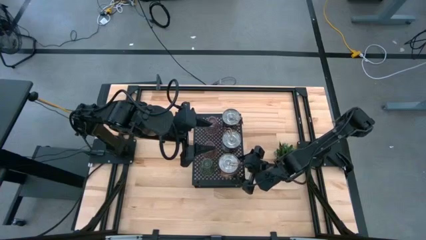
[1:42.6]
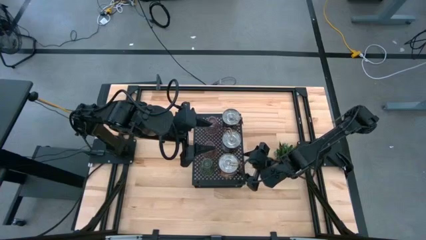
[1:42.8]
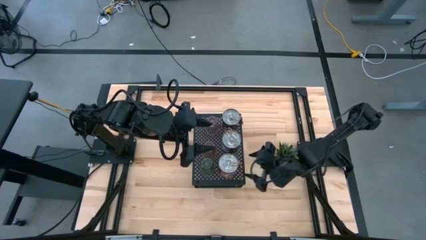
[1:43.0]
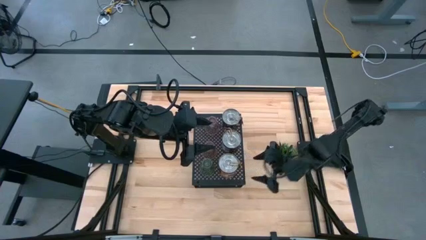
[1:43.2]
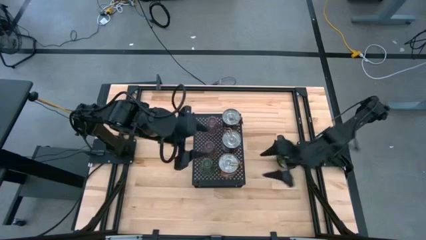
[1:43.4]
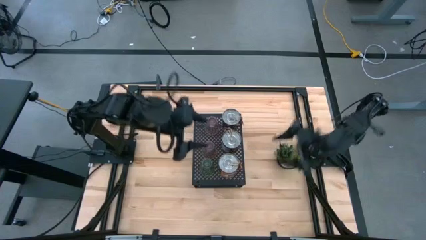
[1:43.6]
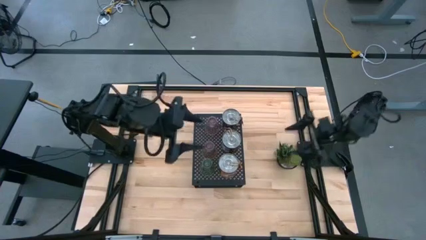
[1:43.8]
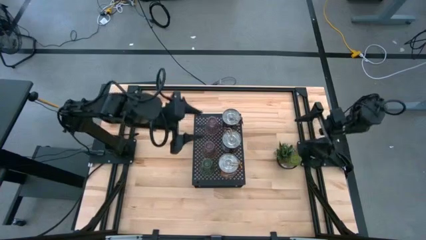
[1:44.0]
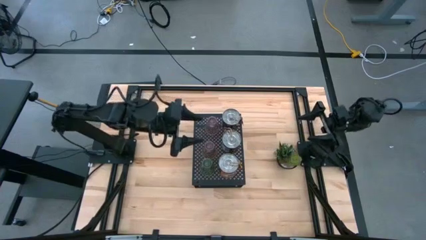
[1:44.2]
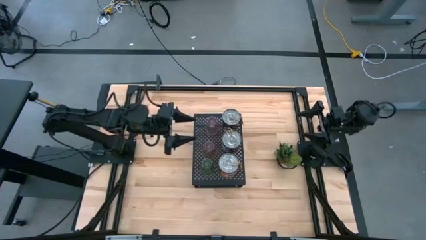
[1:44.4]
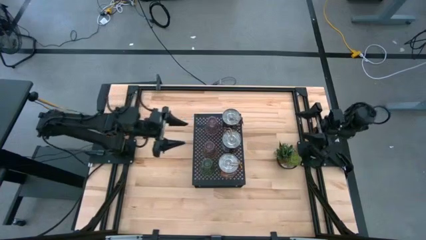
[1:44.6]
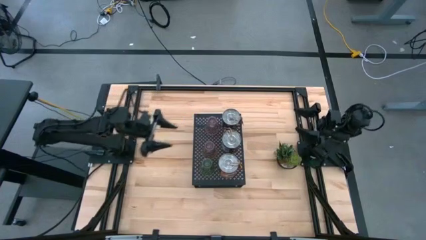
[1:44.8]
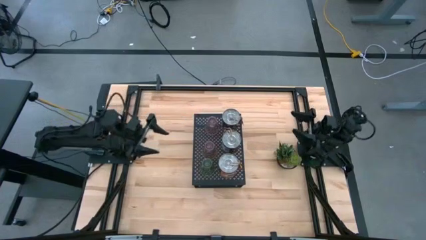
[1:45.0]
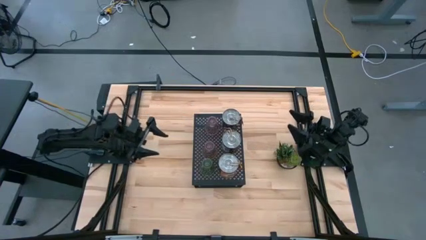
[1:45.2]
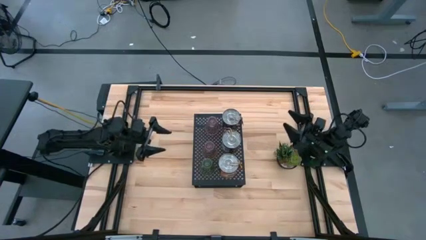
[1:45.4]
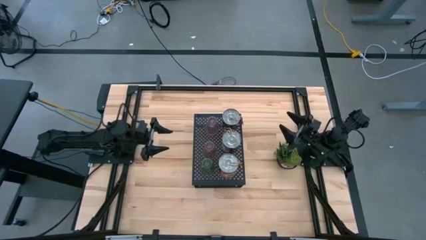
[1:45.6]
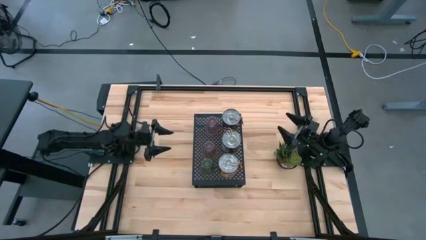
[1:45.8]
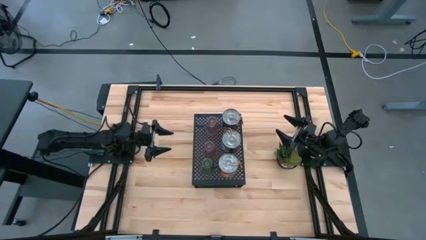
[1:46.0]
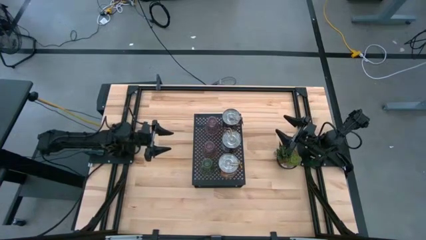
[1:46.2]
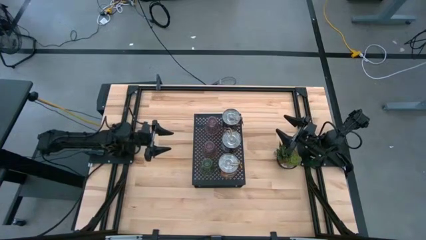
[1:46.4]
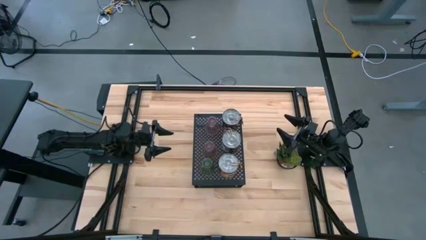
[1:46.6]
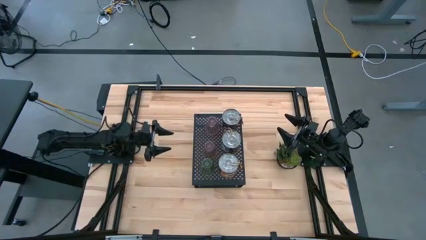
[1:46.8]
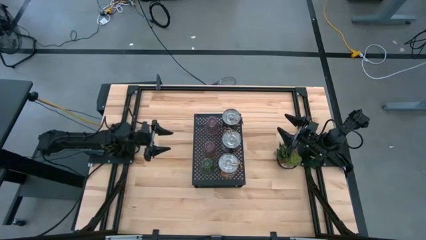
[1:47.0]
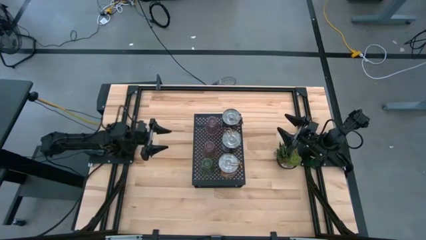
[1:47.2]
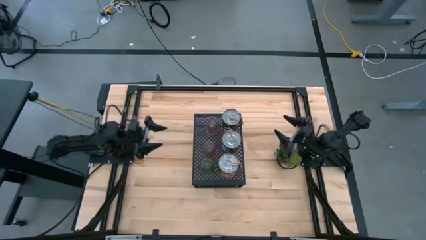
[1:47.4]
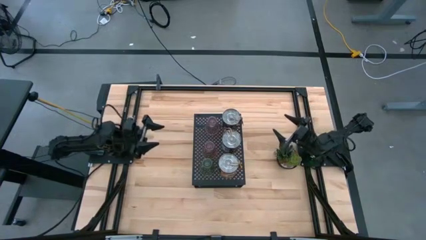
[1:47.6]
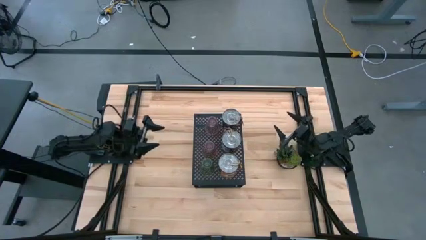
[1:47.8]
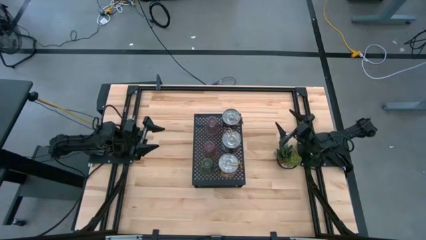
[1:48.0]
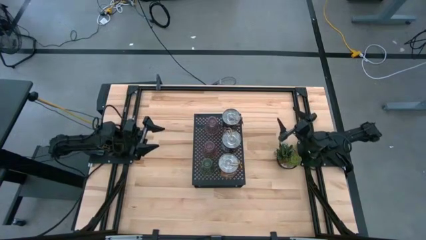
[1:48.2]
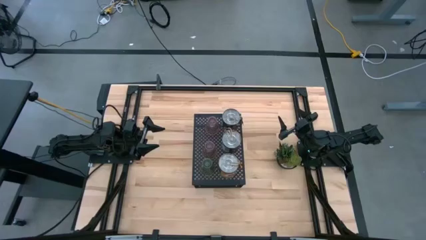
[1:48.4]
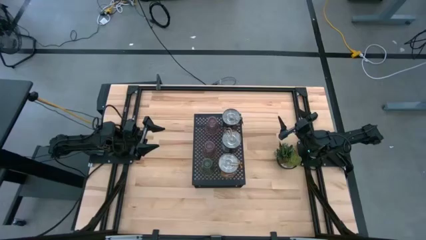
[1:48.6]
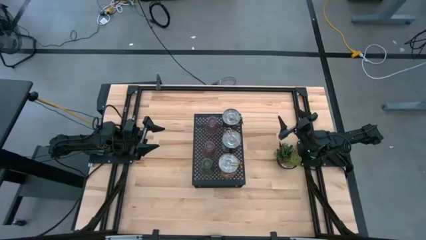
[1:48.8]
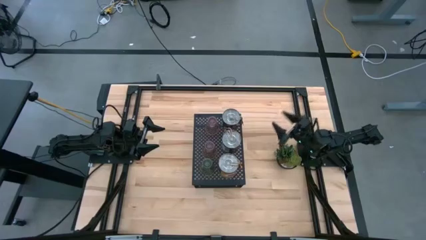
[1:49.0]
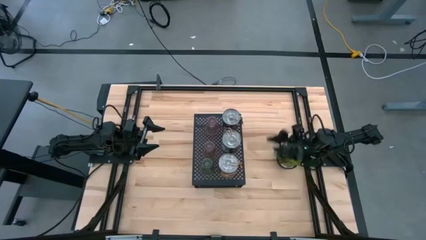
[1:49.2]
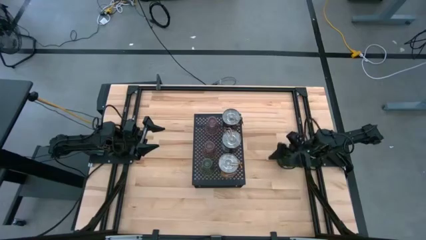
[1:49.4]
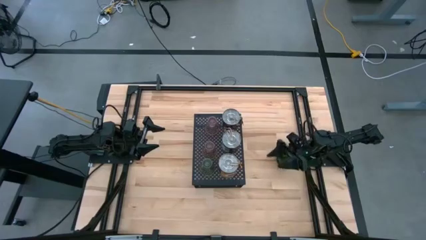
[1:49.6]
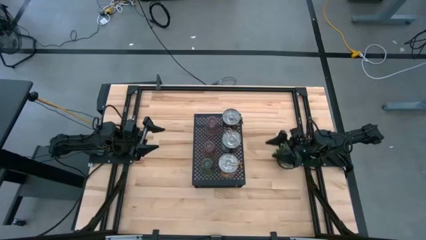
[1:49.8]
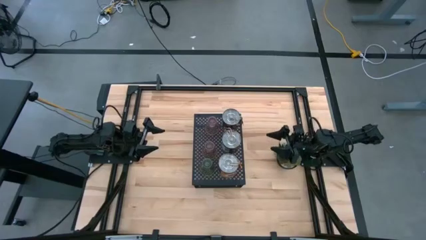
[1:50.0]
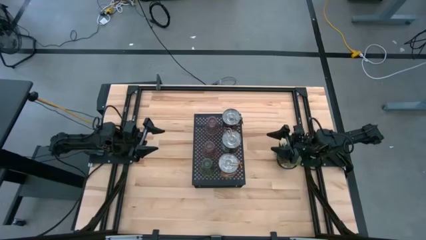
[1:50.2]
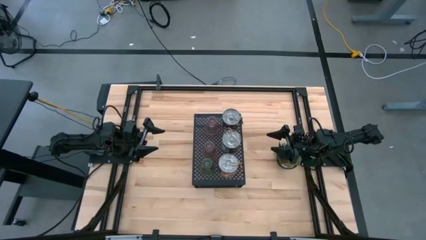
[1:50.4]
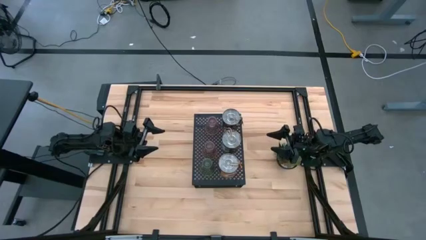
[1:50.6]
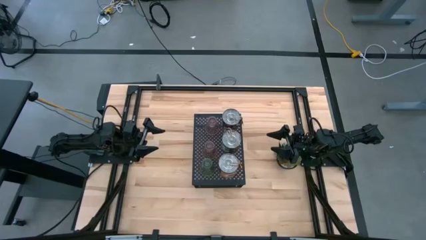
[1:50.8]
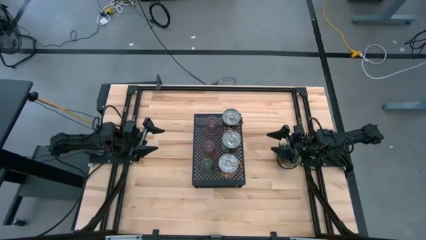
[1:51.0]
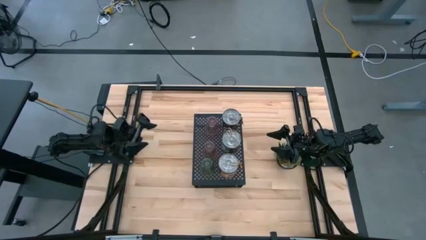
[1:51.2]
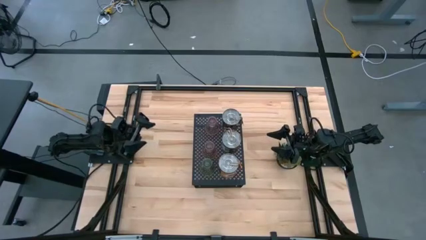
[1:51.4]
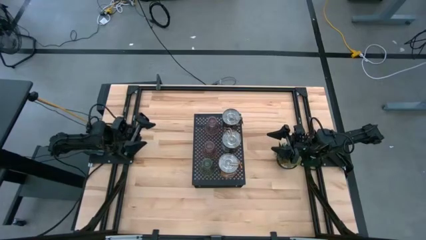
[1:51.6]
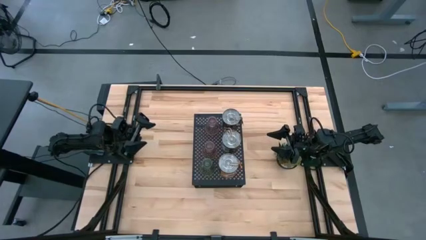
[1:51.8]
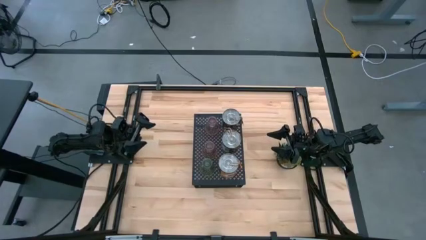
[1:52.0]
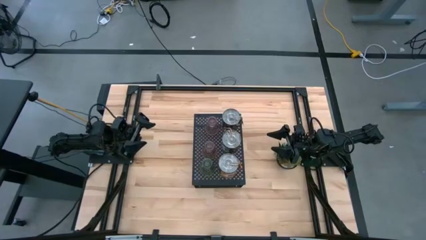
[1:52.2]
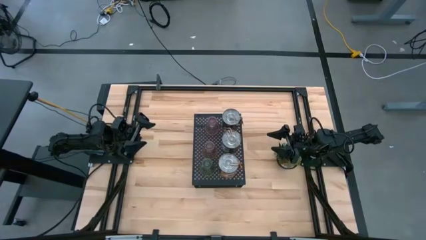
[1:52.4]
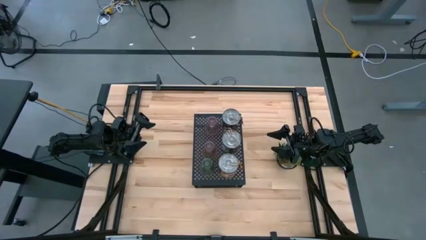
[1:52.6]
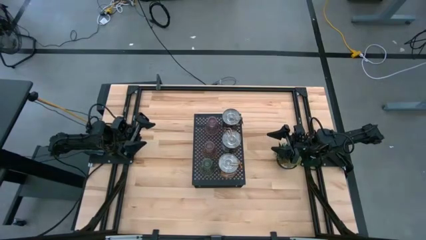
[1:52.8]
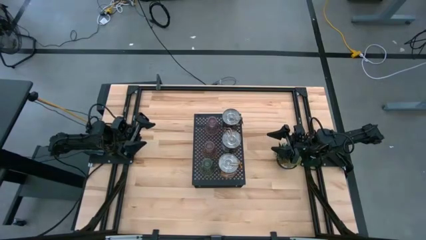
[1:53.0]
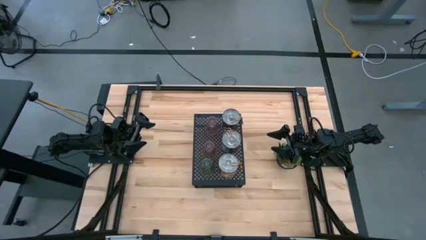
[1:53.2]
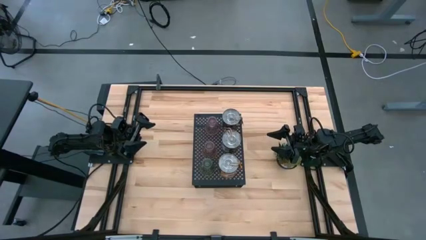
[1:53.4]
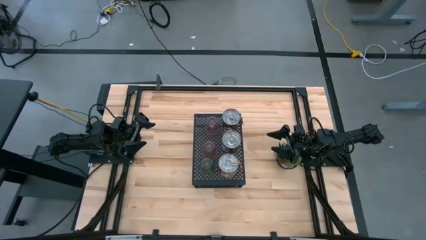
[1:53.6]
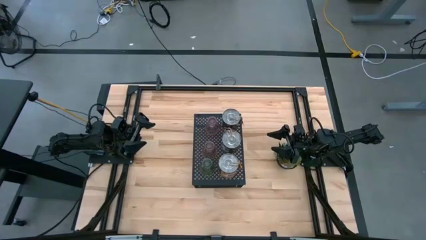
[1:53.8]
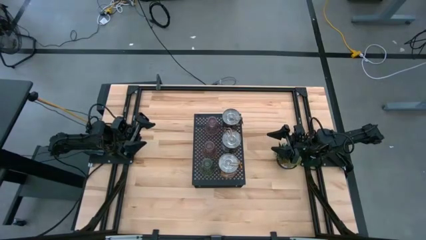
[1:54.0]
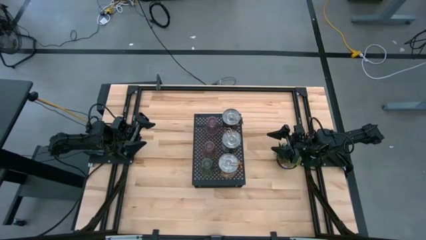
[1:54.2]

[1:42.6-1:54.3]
Task: Pick & Place candle stick holders
Return to Home Position

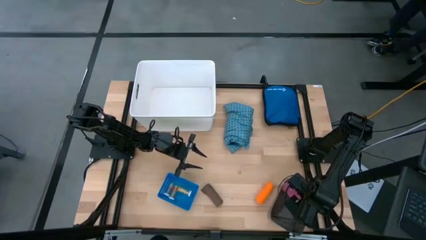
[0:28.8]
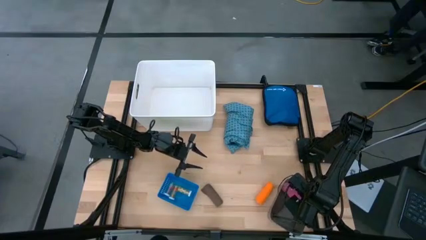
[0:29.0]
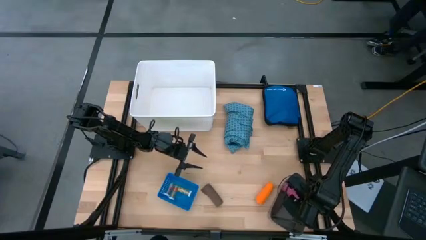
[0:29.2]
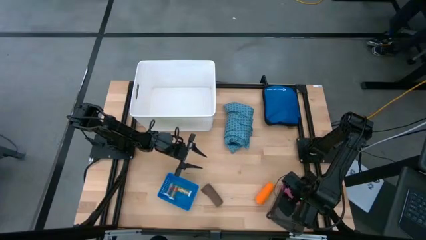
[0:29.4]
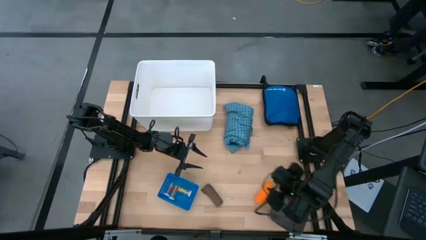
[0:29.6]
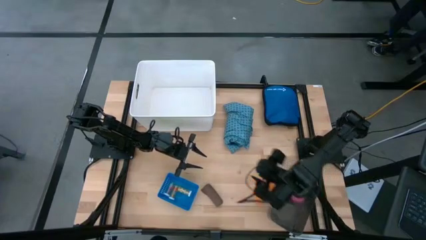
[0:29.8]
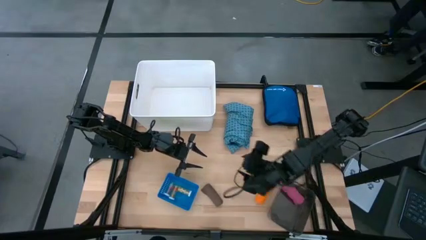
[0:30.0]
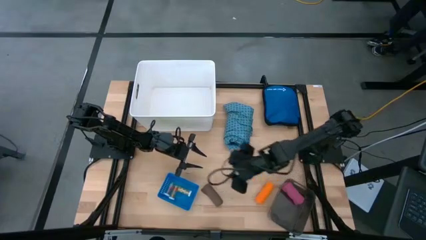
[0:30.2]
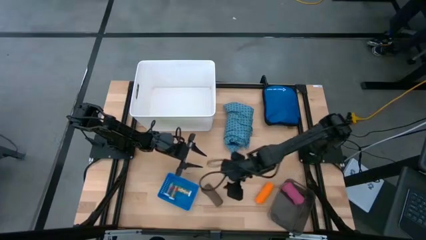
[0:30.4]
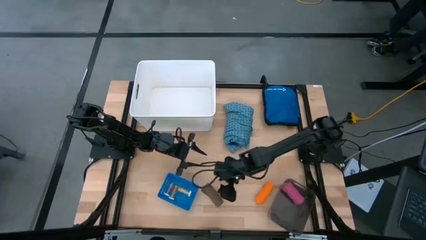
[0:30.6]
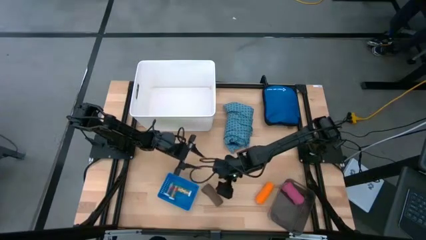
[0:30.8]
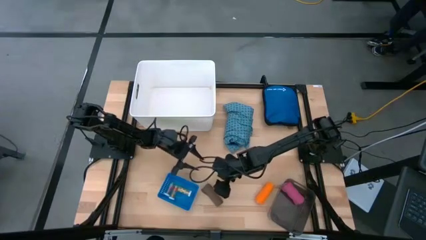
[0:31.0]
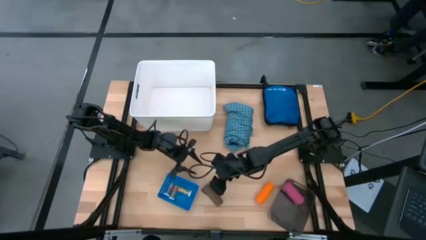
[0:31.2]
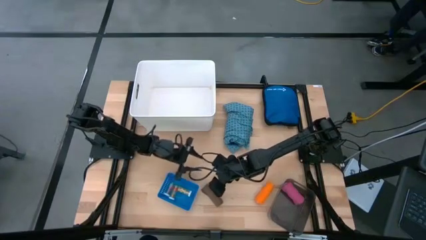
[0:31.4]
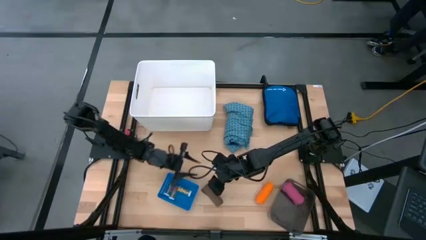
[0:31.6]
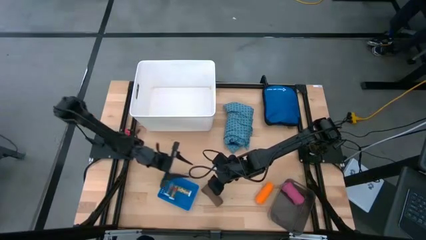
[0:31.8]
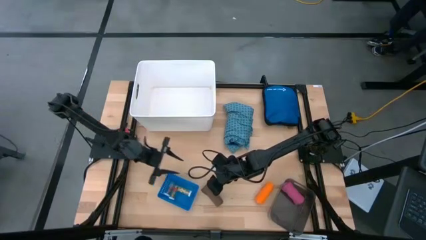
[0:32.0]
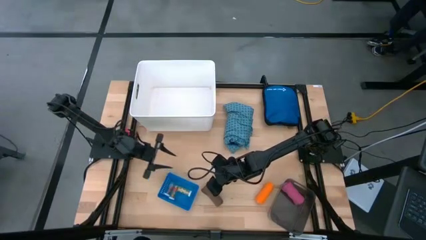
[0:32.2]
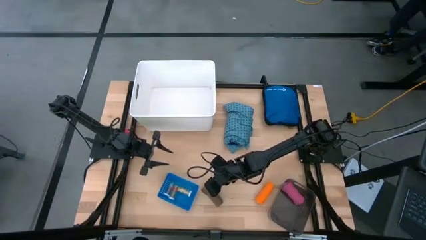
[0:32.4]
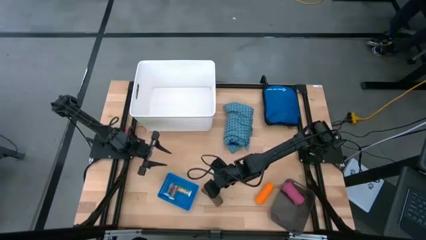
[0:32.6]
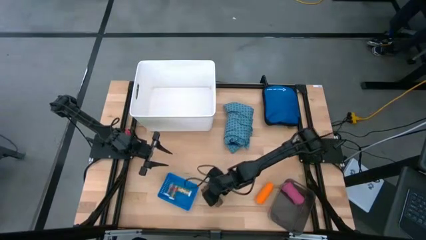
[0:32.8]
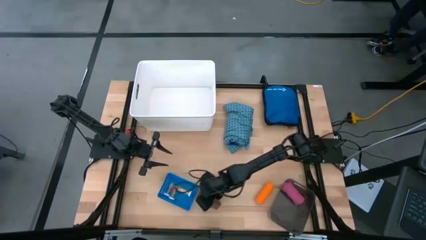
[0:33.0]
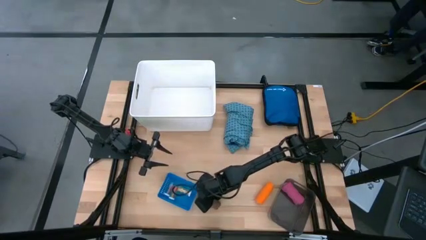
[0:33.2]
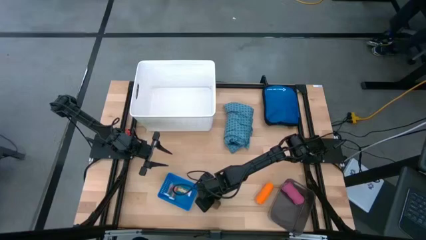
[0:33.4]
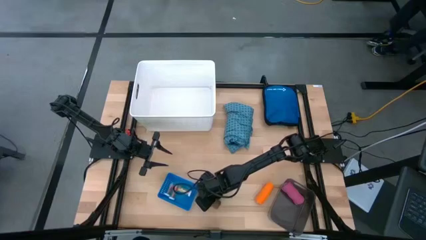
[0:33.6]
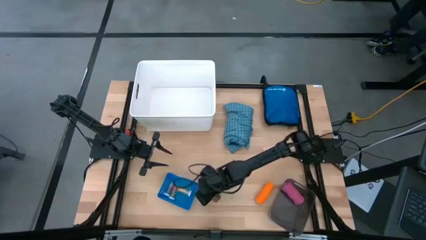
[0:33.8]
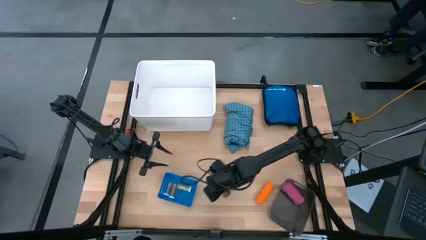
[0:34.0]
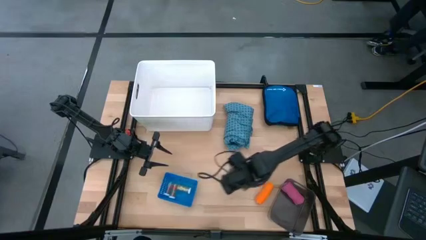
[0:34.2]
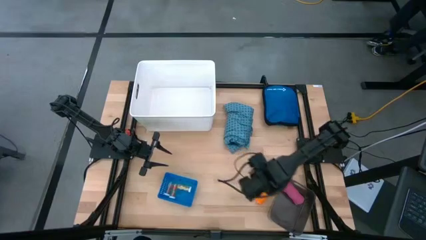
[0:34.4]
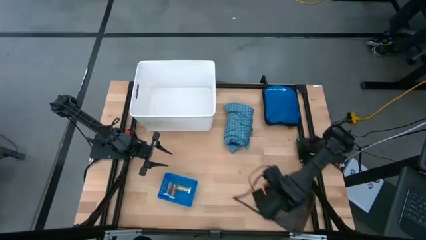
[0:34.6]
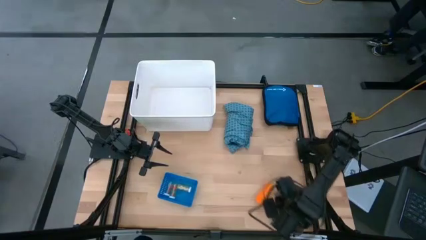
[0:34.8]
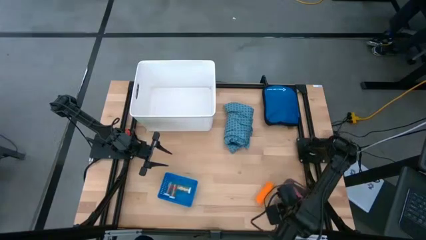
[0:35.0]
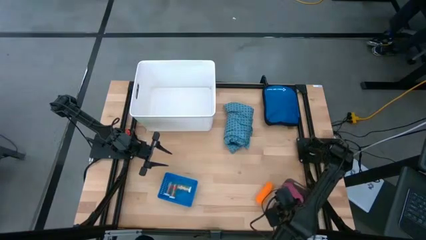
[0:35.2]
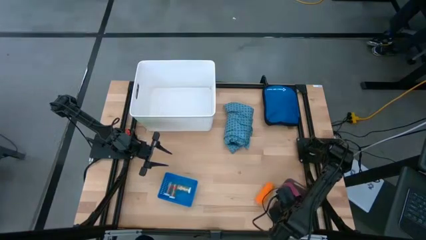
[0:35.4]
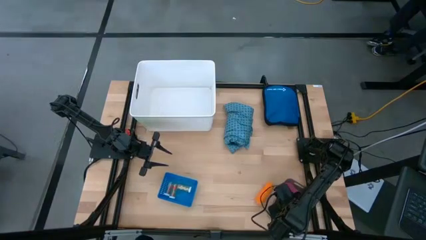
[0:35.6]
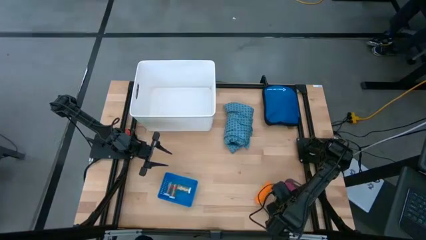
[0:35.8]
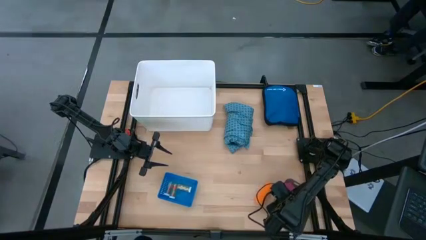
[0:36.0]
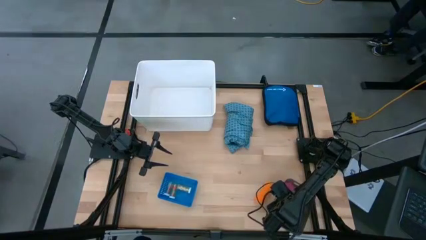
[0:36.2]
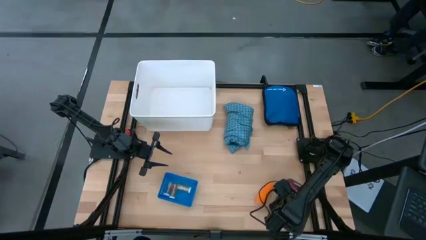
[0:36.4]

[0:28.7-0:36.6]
Task: Pick & Place Medicine items
Put the brown bandage into the black bin
